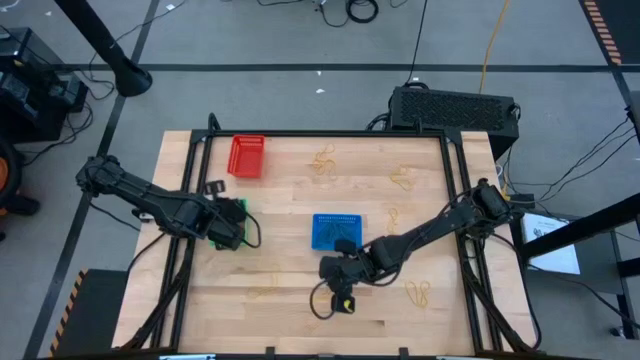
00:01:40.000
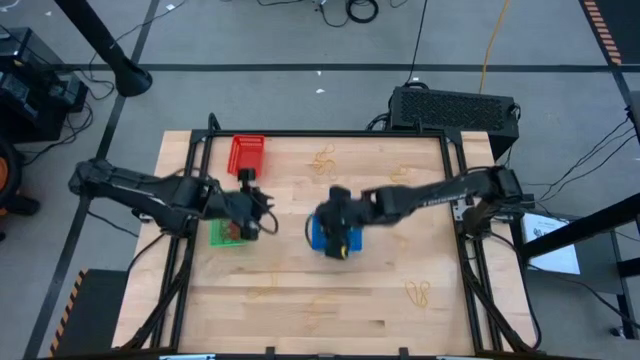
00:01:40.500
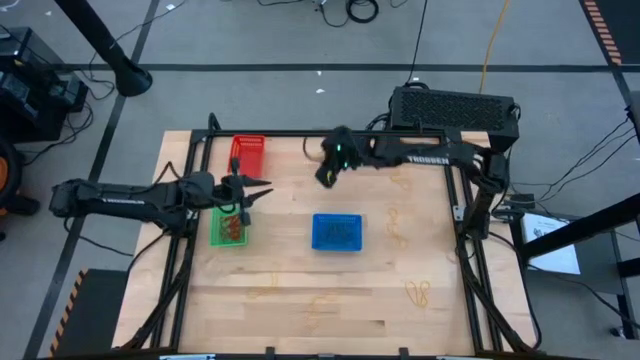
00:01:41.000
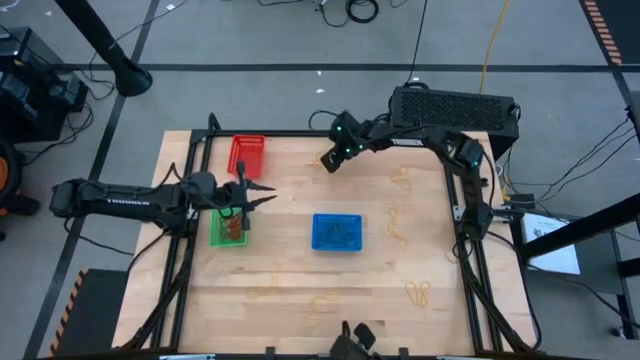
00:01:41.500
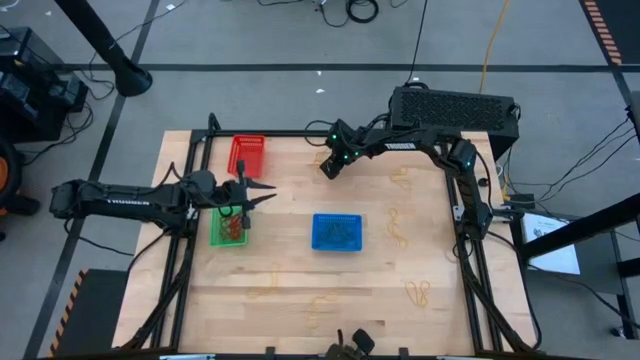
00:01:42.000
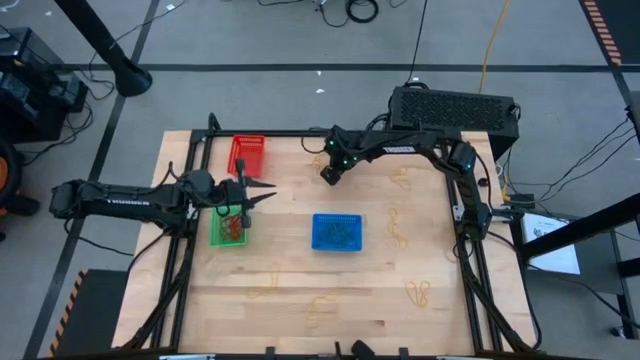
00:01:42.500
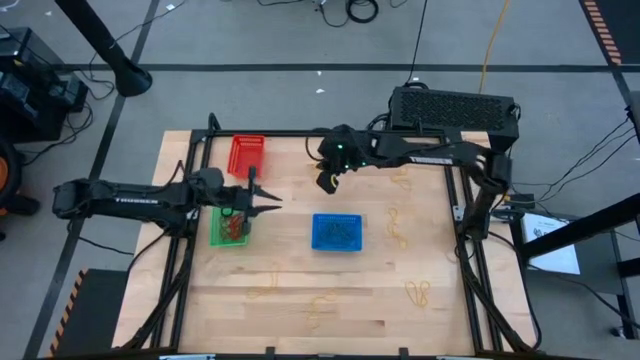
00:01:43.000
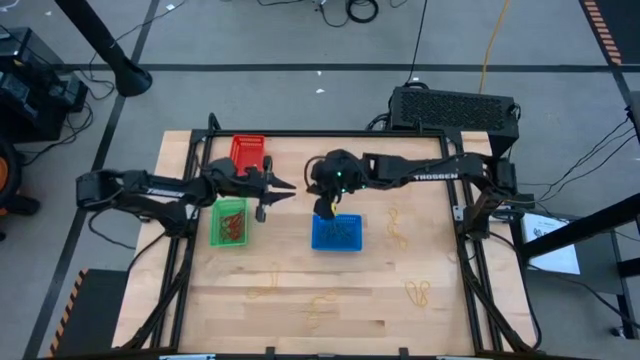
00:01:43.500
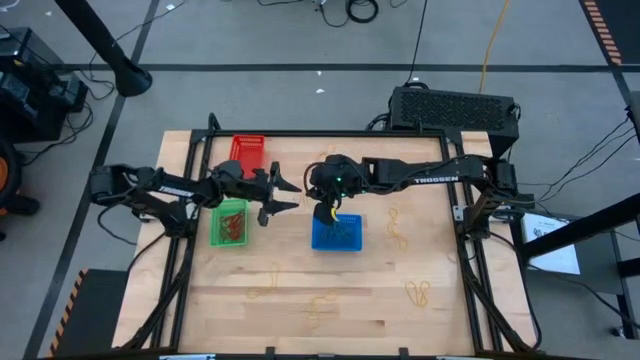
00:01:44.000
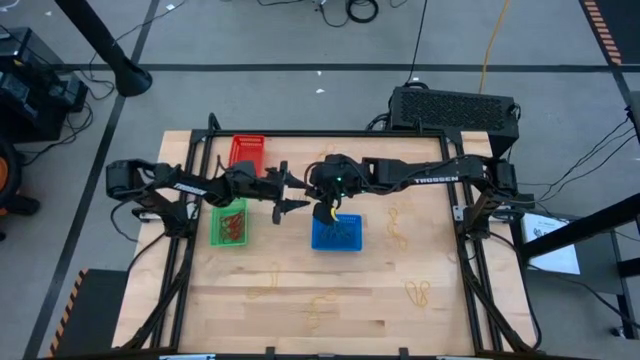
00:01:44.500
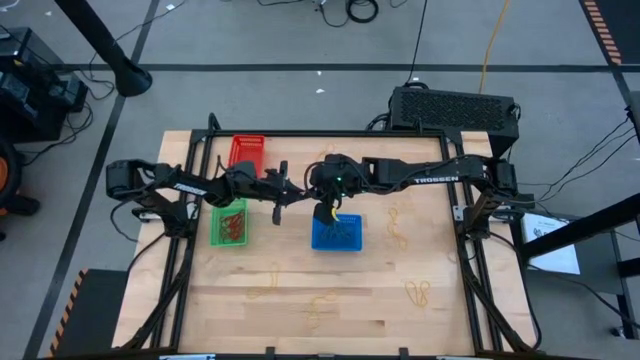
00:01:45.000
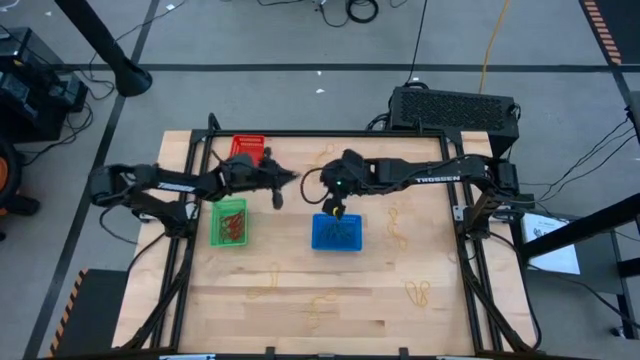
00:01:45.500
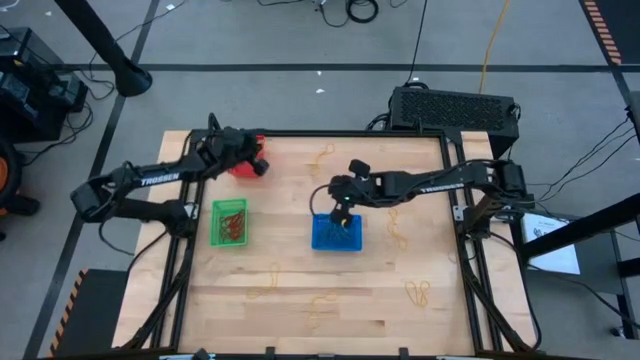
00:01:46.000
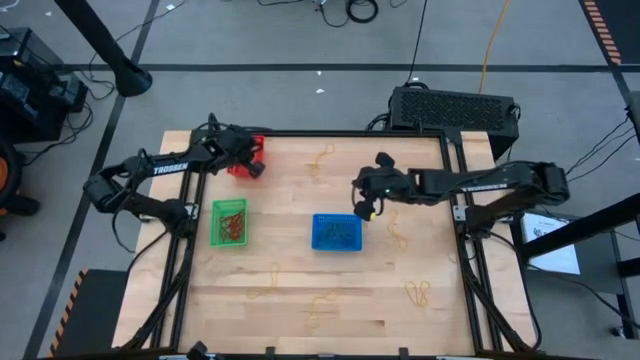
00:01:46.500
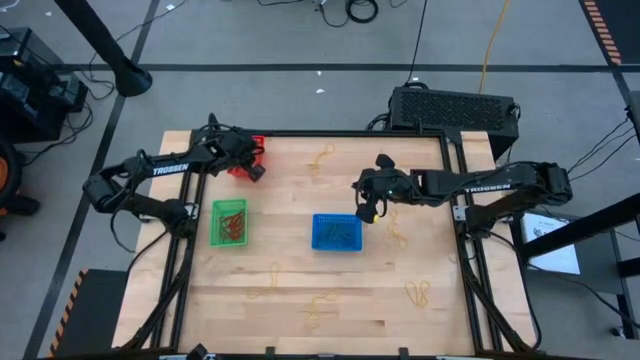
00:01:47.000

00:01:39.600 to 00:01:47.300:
Task: Sort rubber bands into baskets
Put the yellow rubber band into the red bin

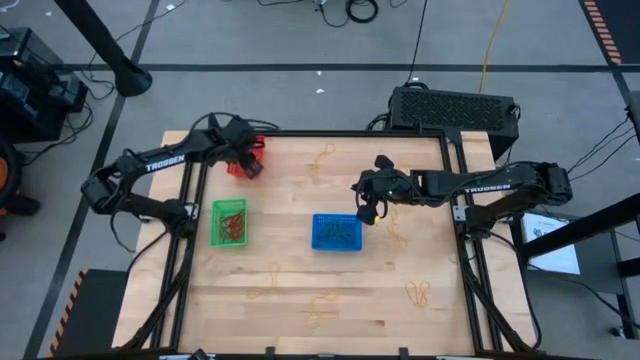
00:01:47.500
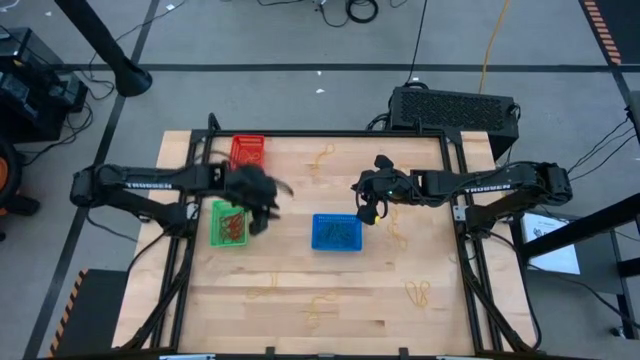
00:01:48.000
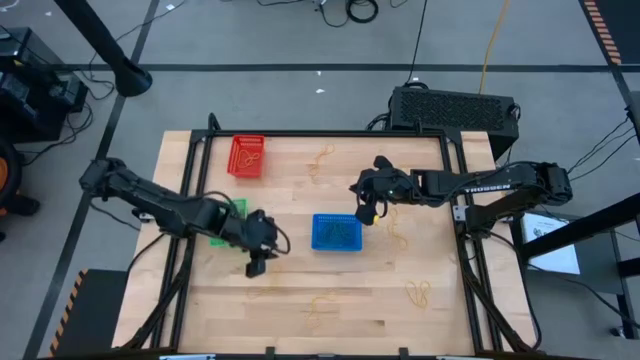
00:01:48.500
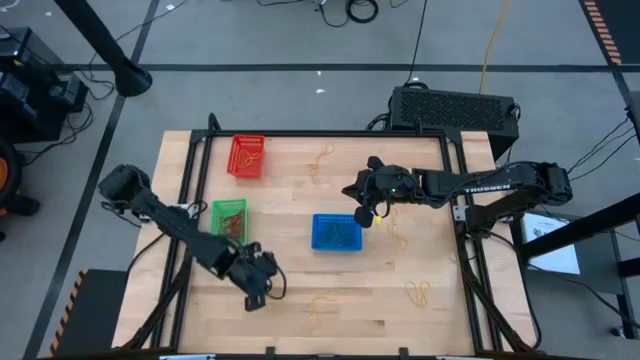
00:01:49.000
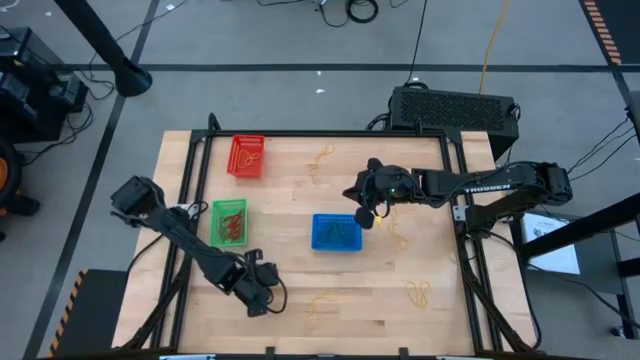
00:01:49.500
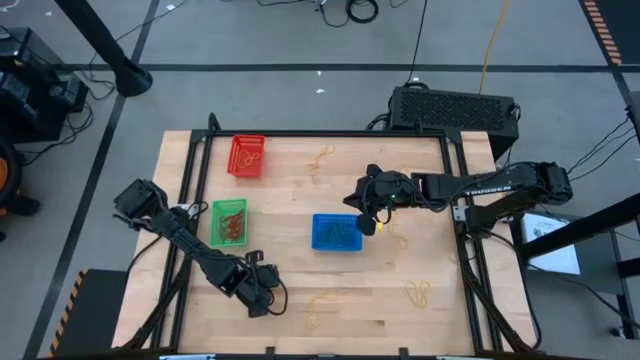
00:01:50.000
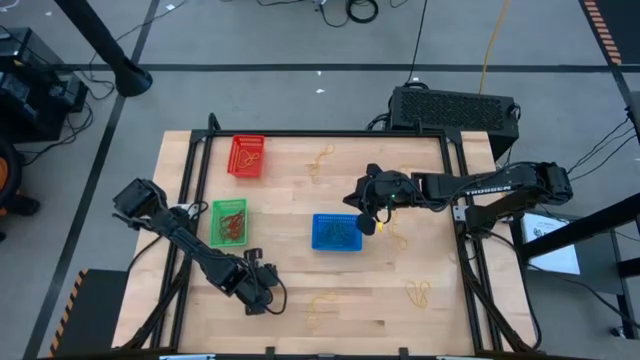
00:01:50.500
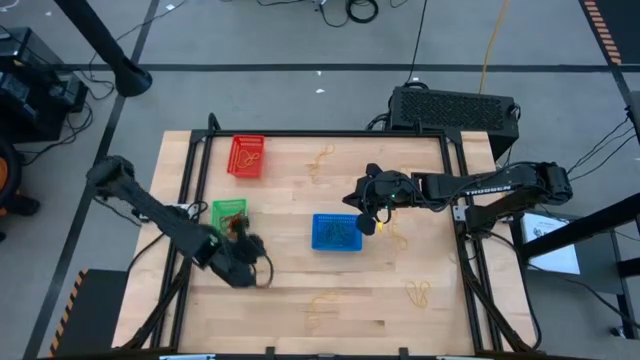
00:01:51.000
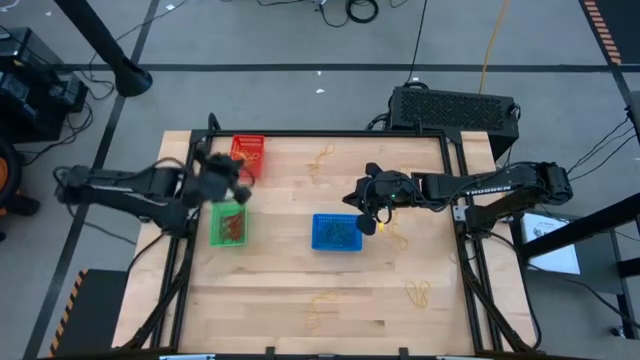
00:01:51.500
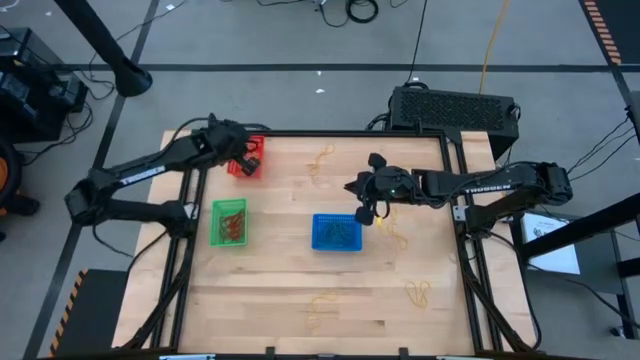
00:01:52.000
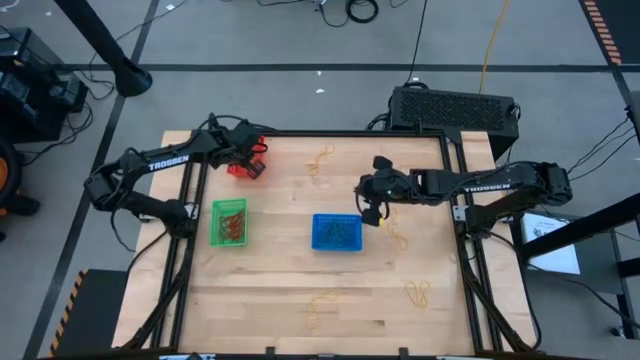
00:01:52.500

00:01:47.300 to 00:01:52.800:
Put the yellow rubber band into the red bin

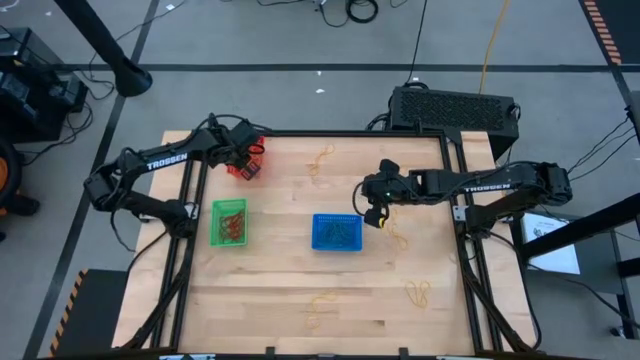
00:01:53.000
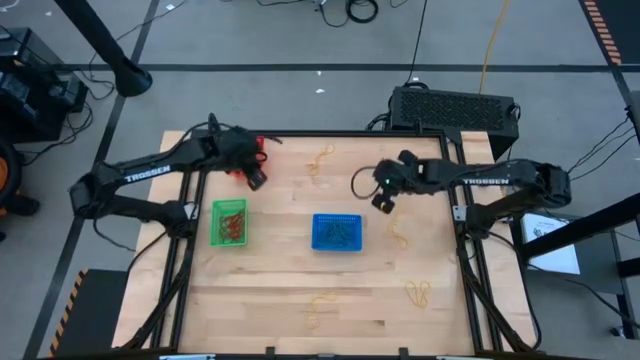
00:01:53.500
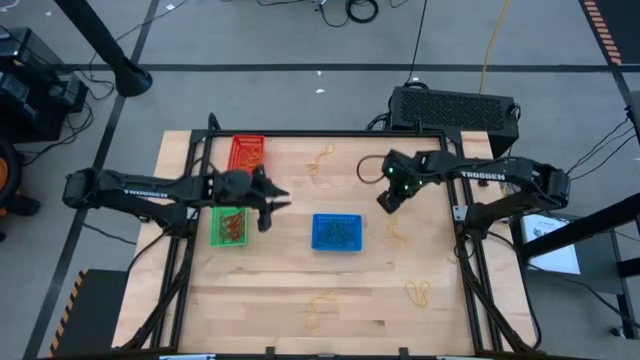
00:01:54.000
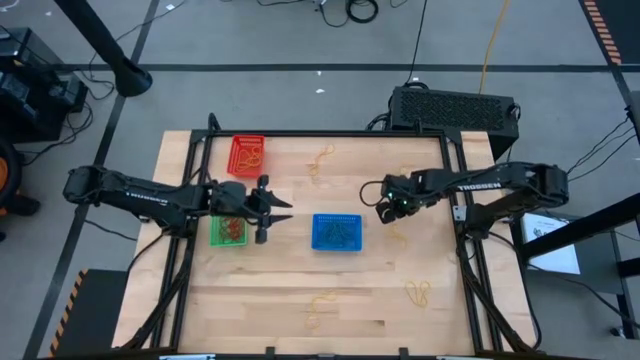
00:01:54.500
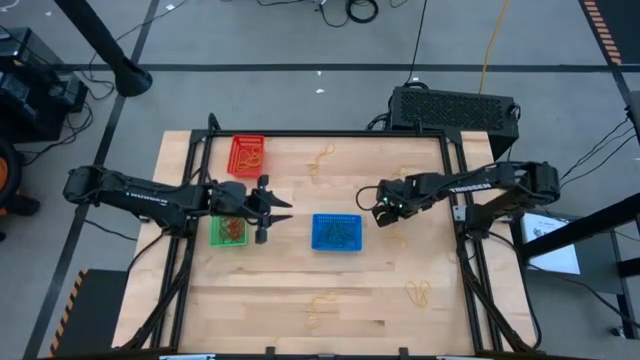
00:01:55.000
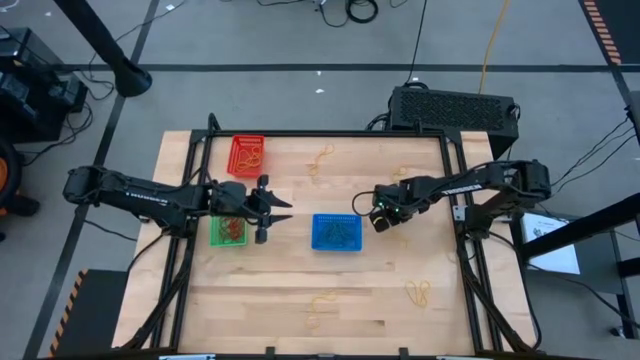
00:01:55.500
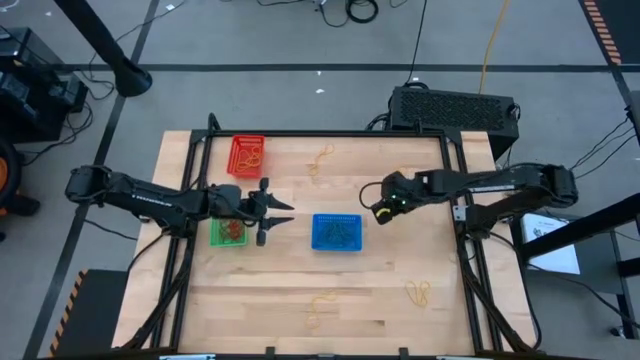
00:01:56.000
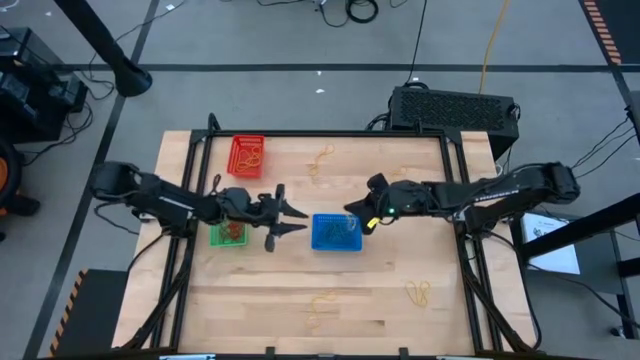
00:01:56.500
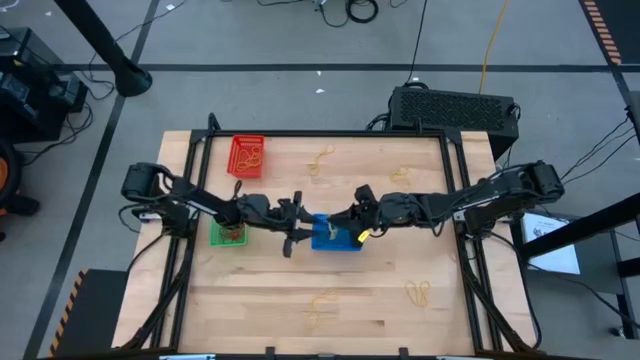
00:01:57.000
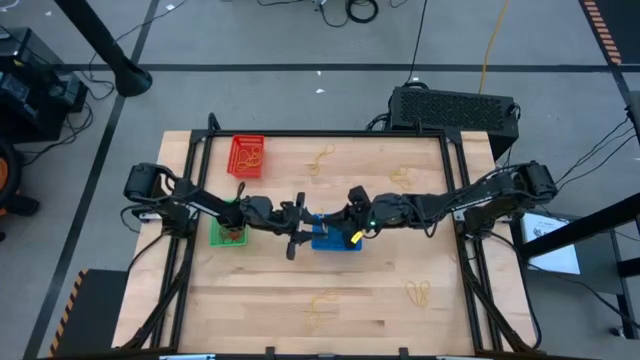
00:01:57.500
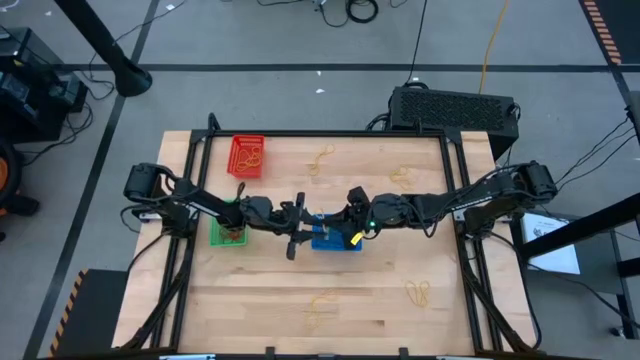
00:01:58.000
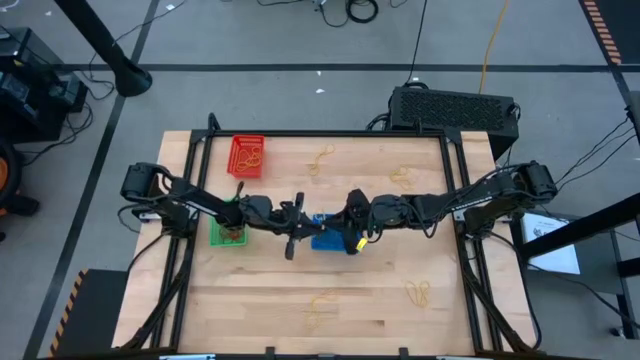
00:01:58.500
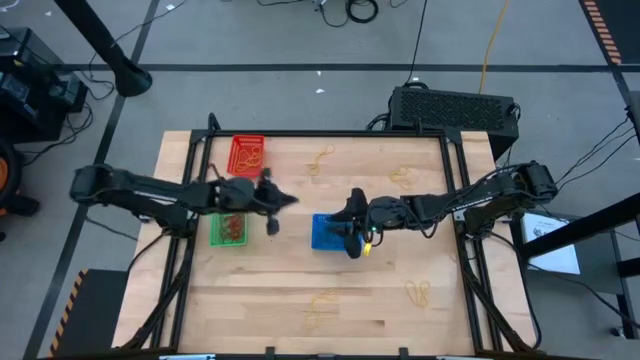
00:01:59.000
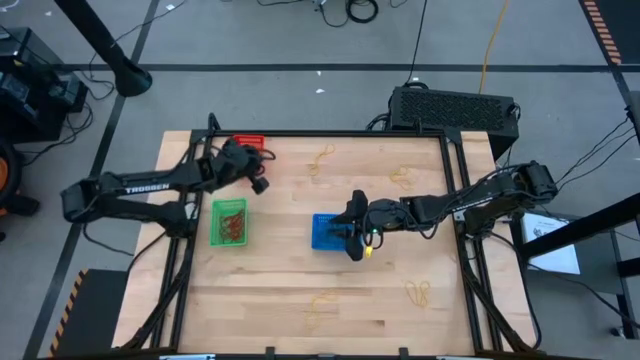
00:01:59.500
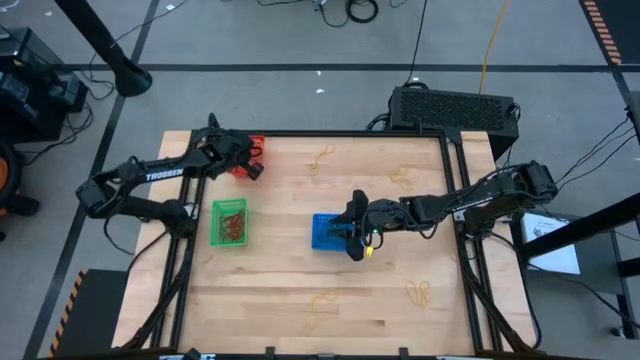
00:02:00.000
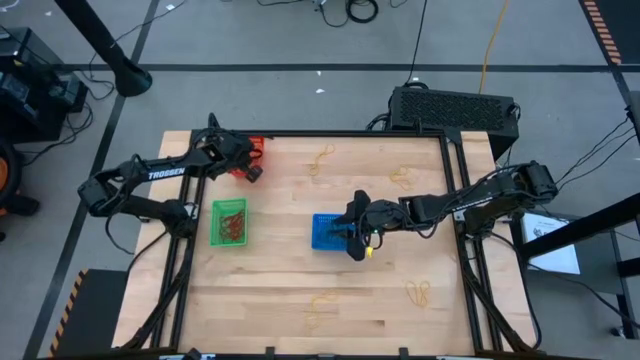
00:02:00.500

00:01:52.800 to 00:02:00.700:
Put the yellow rubber band into the red bin
